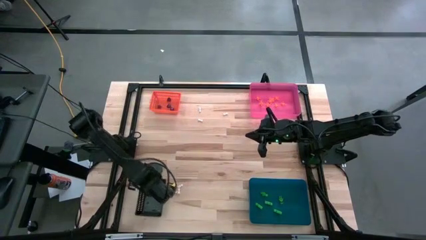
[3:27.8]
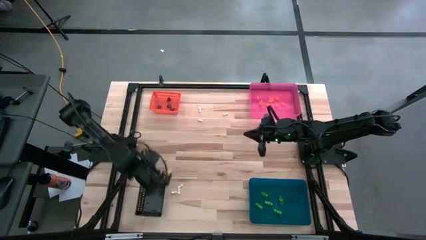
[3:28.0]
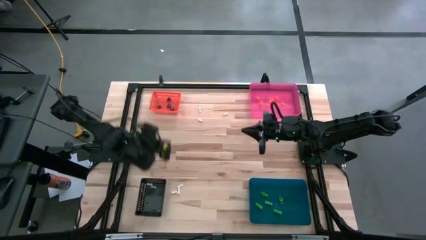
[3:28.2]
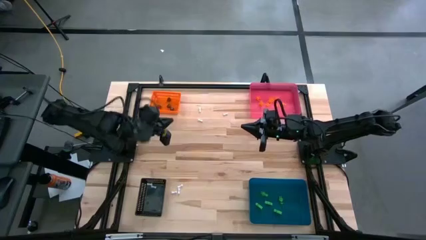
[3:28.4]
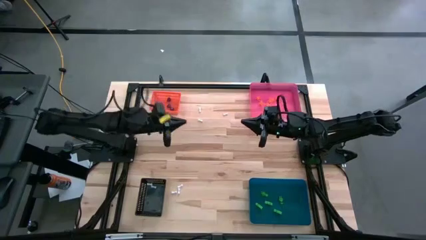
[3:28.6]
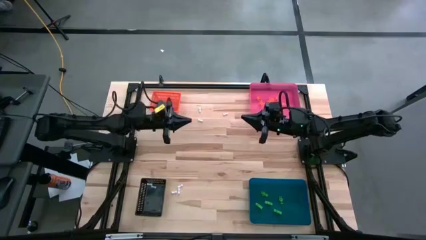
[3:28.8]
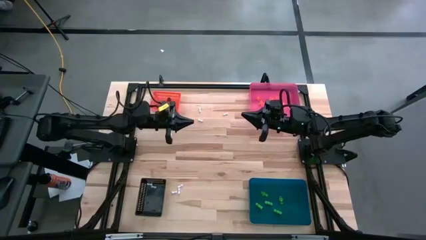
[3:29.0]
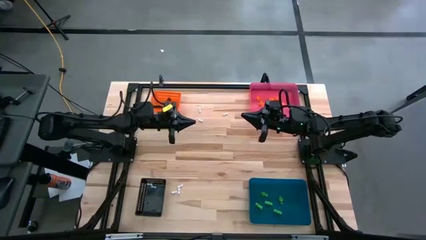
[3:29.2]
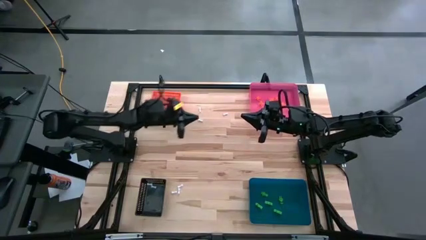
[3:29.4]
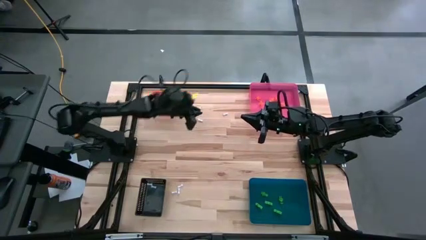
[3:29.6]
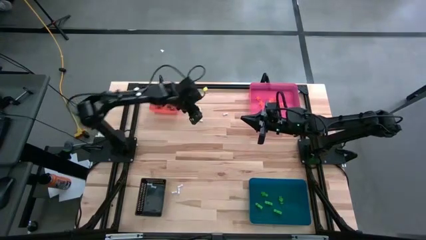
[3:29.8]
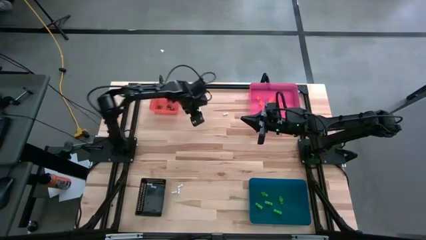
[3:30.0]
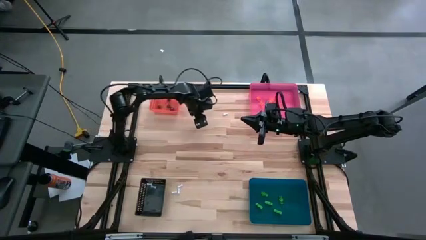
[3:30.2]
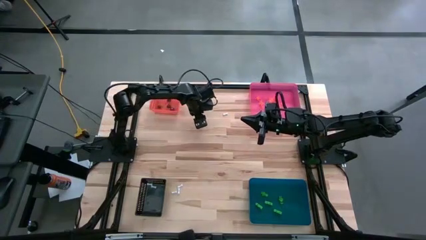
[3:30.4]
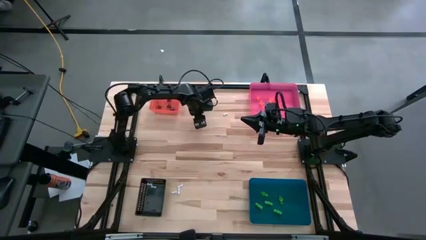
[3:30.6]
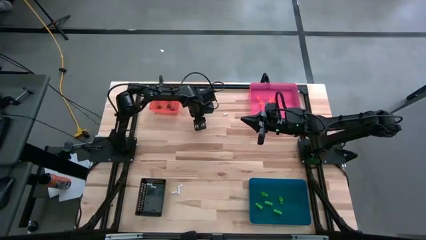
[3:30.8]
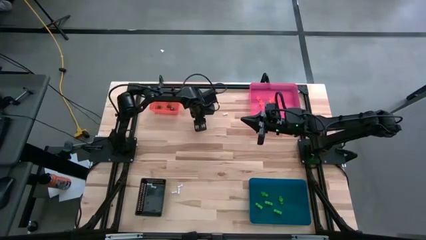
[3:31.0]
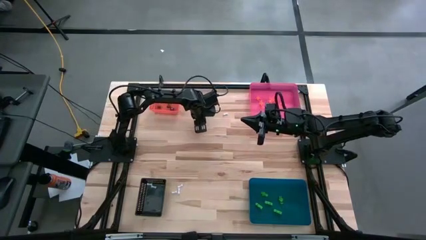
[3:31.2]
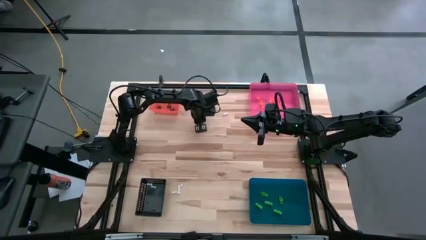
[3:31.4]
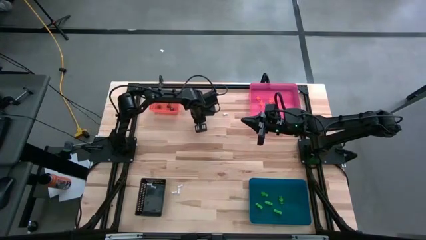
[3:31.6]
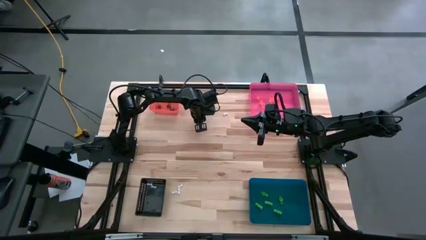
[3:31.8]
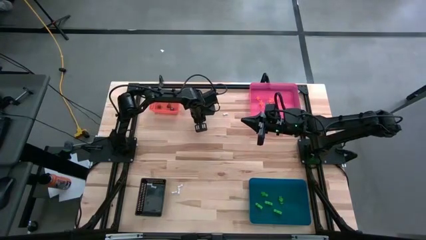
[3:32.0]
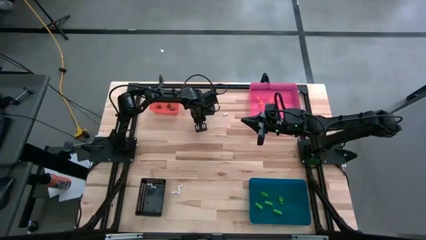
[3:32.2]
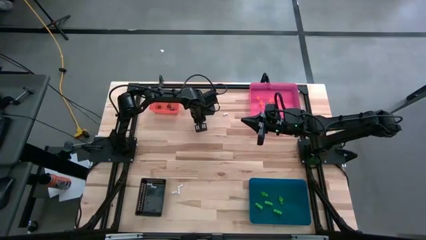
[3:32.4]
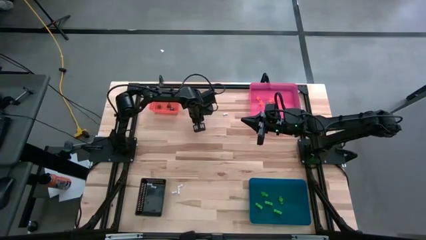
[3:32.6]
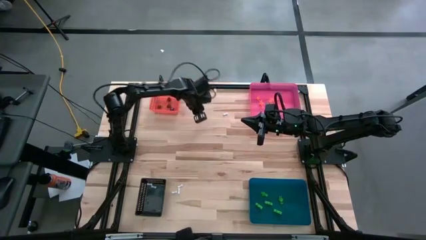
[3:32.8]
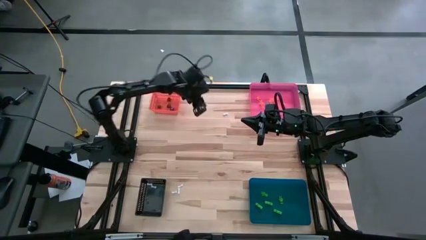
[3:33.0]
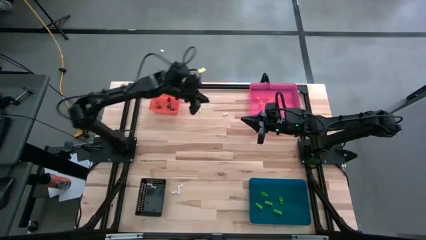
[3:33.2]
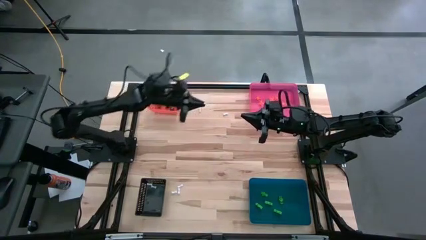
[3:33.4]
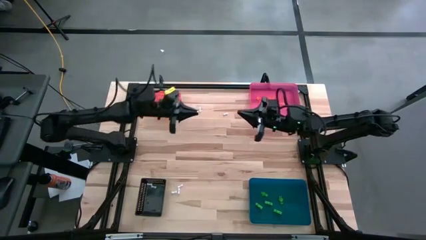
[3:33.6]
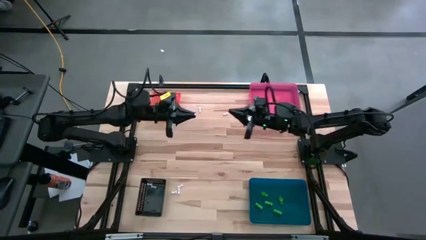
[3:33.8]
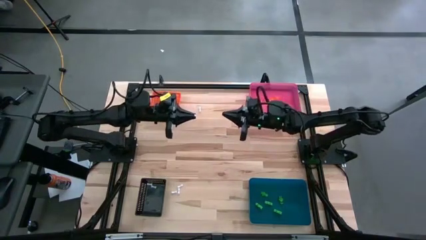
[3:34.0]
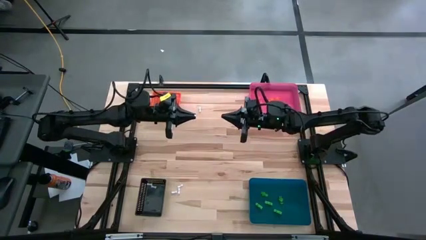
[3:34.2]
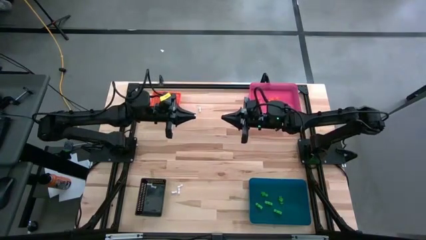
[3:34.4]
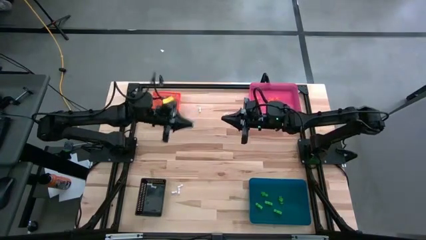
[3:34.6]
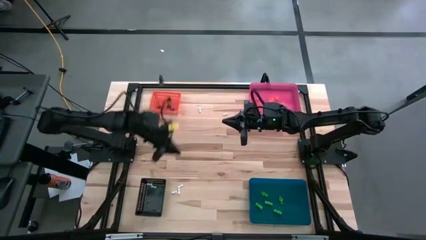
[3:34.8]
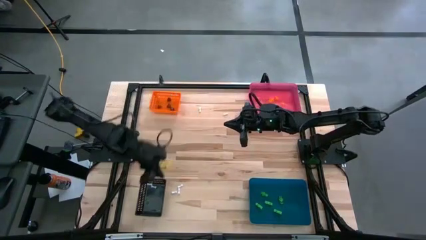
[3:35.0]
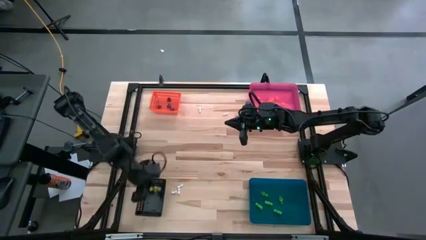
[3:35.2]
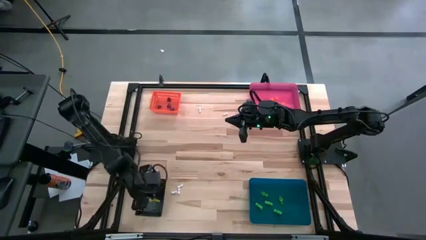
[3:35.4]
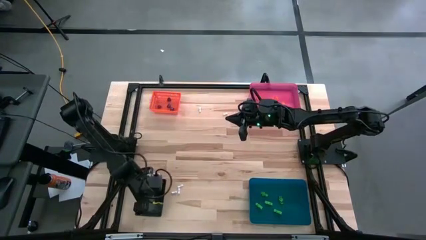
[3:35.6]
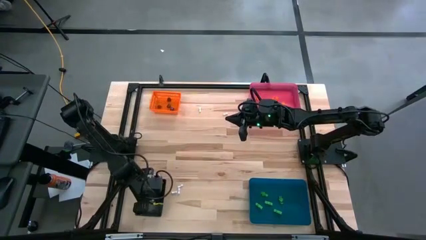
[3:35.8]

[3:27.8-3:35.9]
Task: Sort Halloween decoration
Put the white bone toy into the black bin

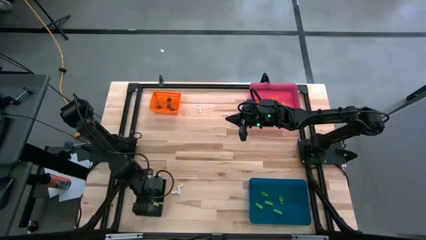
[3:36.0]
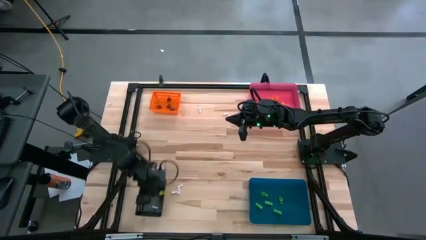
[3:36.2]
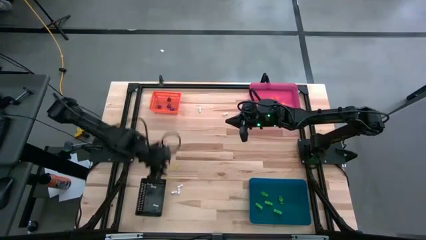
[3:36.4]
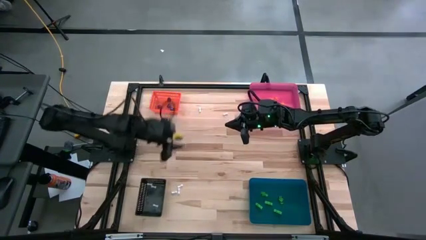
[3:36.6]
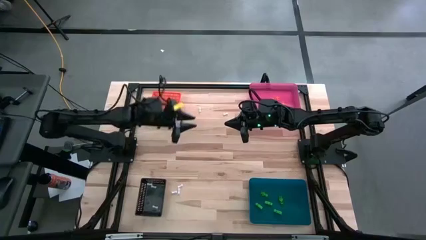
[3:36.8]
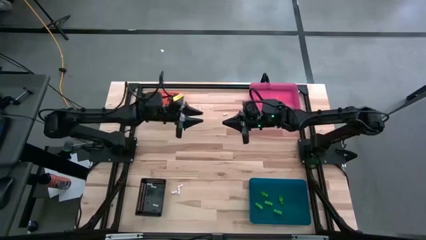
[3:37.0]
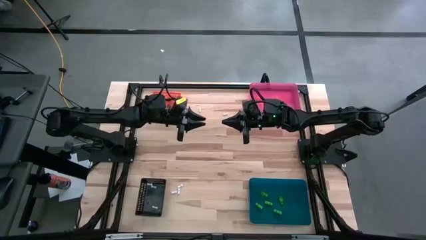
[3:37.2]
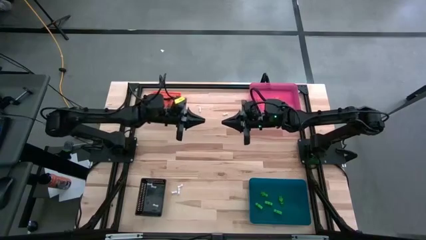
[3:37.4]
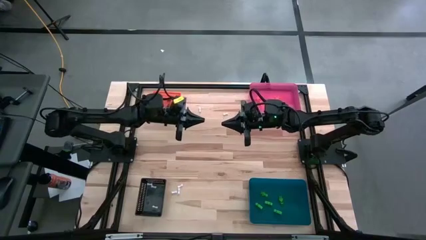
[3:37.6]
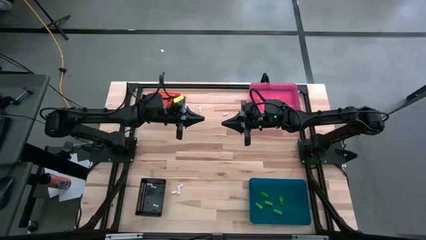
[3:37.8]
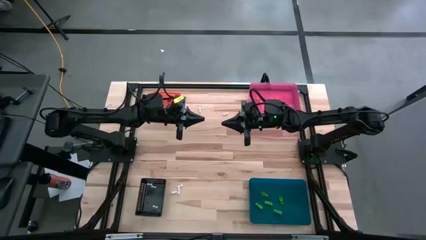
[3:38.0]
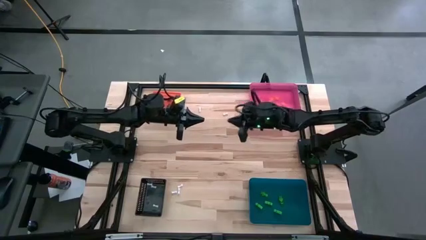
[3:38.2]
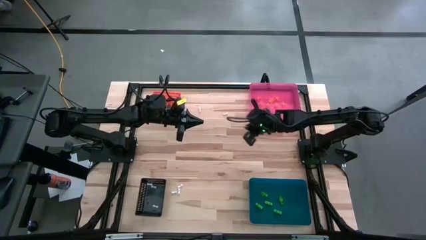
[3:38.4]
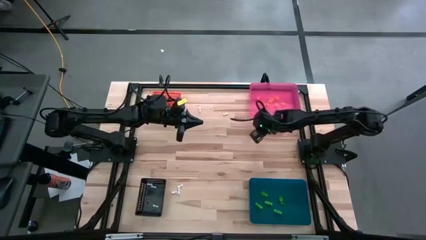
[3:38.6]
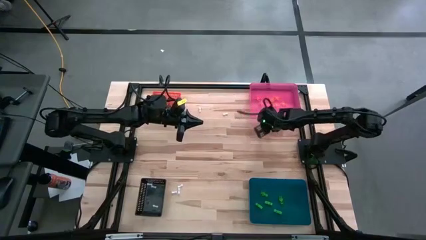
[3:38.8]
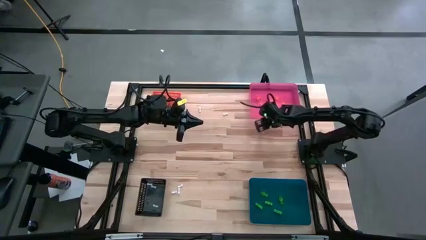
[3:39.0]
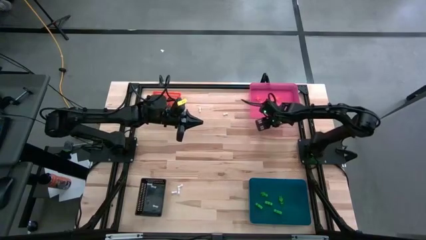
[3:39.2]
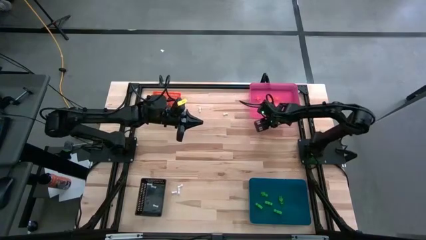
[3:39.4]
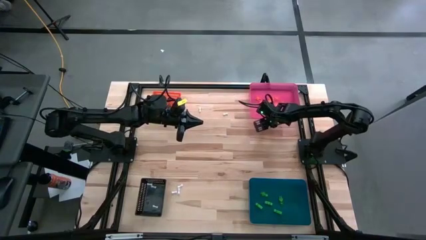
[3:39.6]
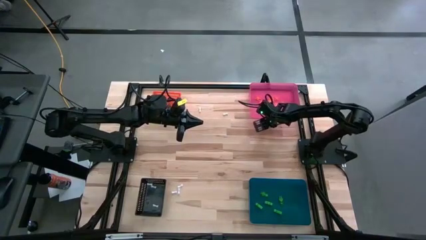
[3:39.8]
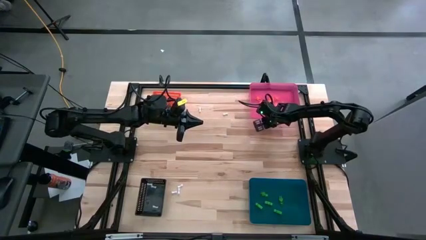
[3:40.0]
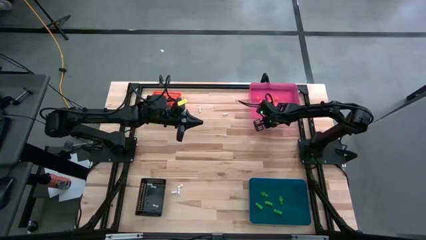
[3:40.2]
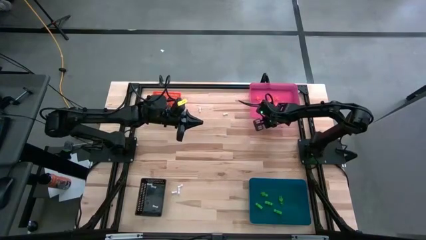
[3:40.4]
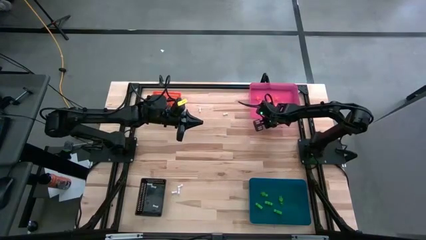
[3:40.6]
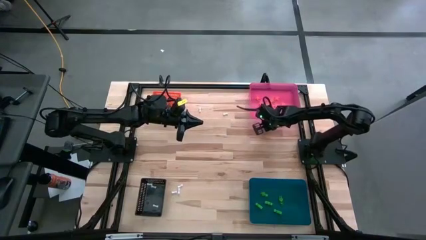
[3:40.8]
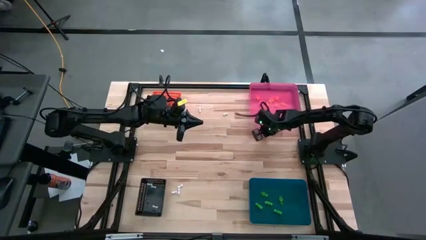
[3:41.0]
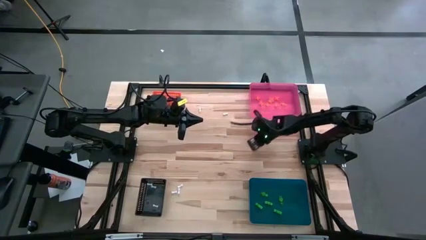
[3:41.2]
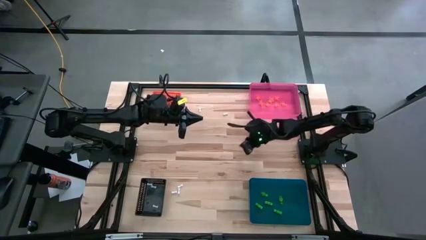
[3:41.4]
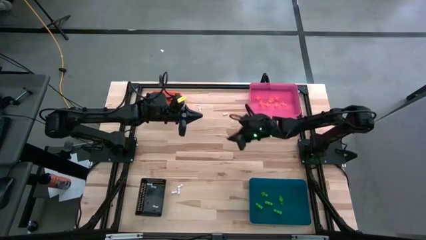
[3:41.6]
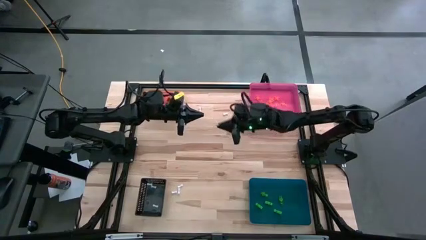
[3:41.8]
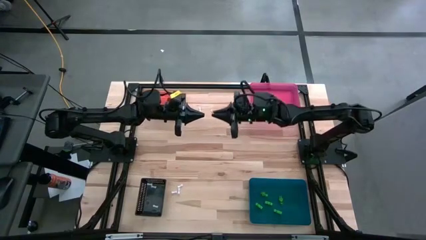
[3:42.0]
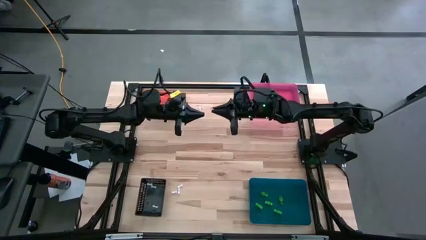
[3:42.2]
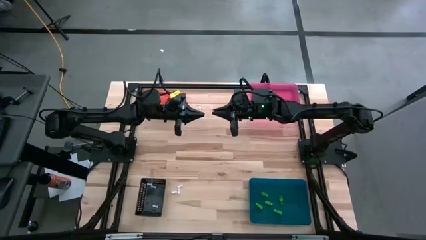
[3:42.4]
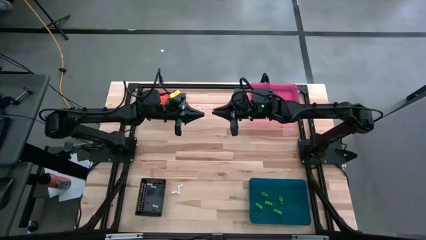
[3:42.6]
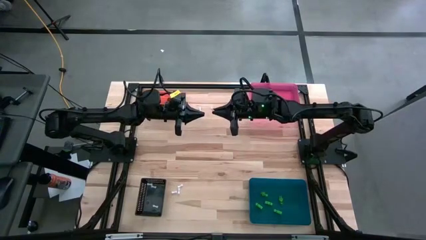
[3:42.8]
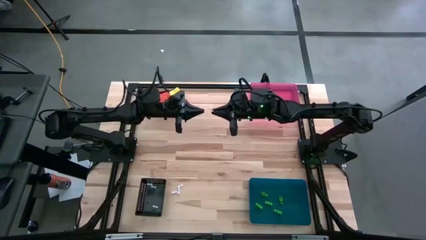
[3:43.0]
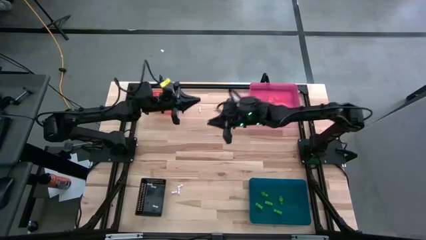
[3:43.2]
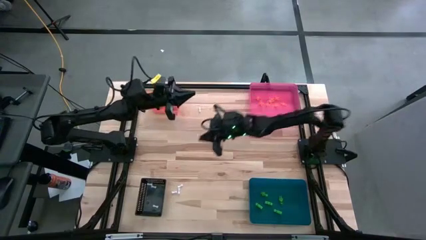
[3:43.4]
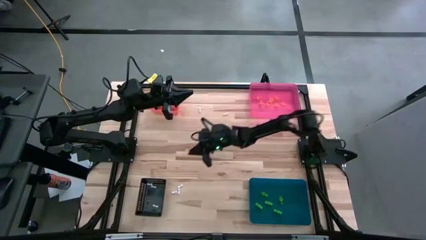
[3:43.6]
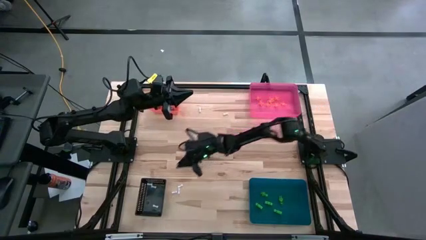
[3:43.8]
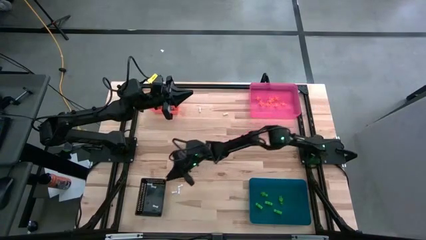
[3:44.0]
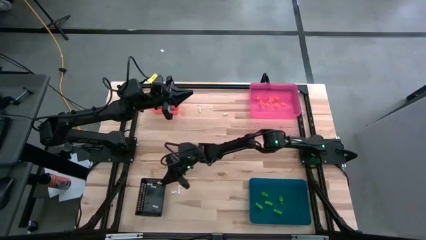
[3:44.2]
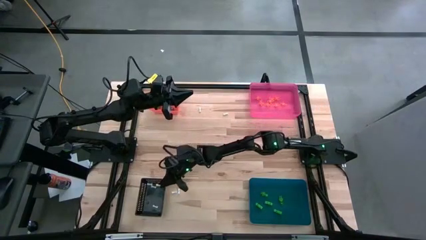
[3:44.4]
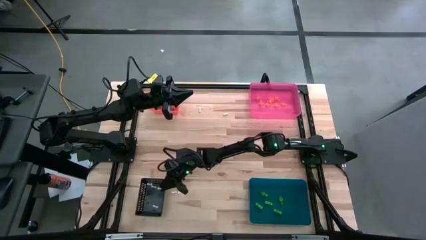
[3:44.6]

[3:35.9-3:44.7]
Put the white bone toy into the black bin
